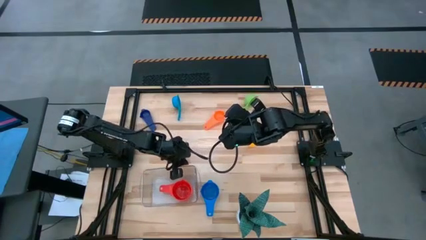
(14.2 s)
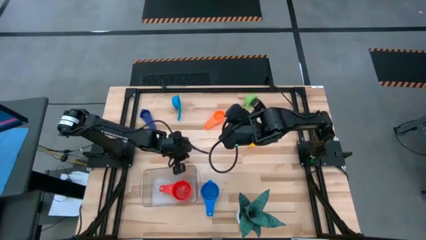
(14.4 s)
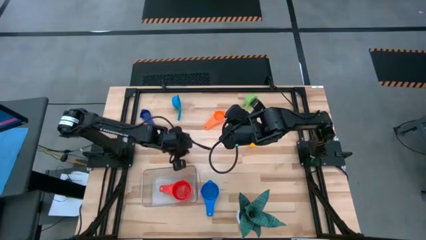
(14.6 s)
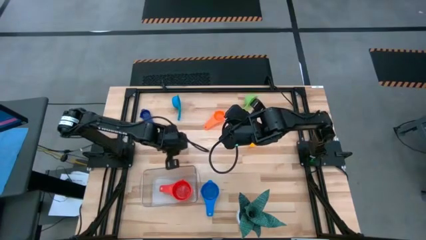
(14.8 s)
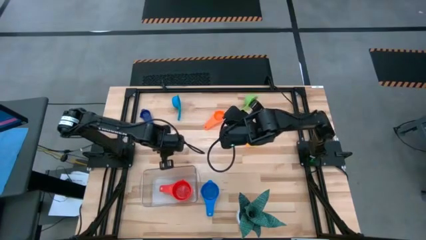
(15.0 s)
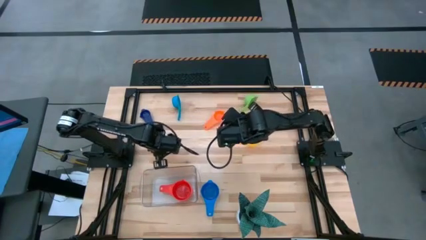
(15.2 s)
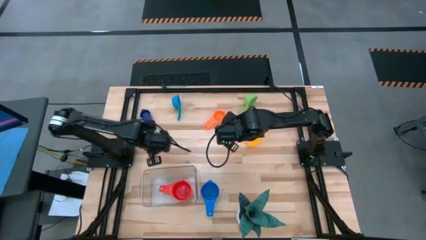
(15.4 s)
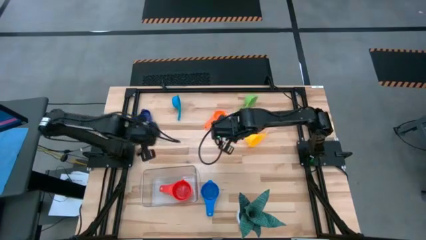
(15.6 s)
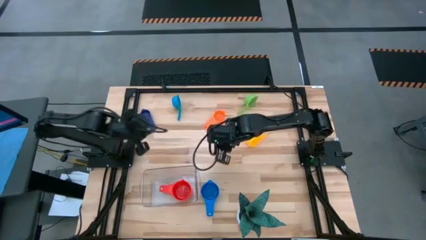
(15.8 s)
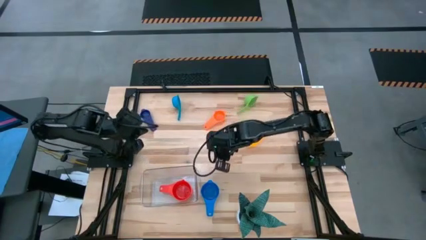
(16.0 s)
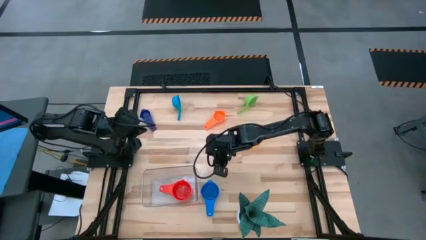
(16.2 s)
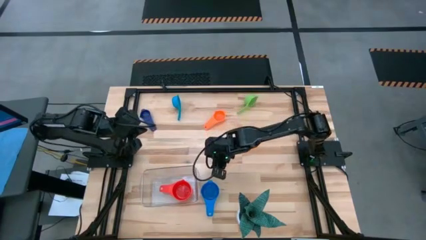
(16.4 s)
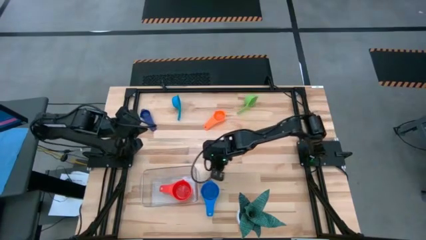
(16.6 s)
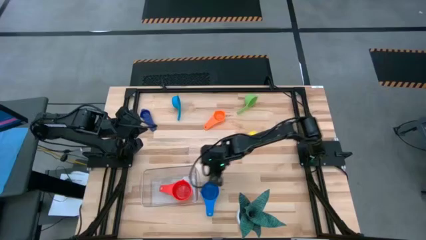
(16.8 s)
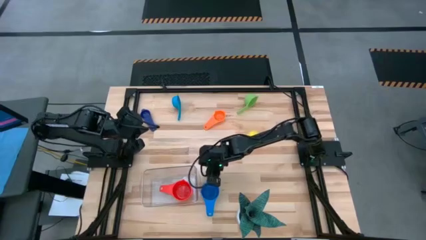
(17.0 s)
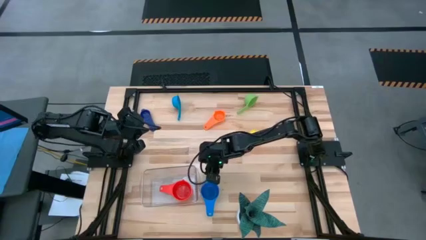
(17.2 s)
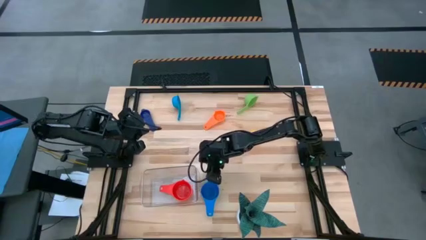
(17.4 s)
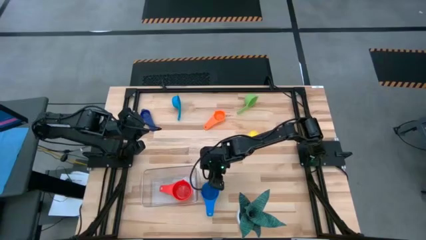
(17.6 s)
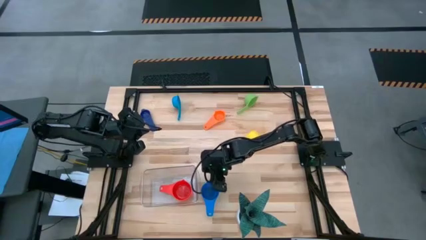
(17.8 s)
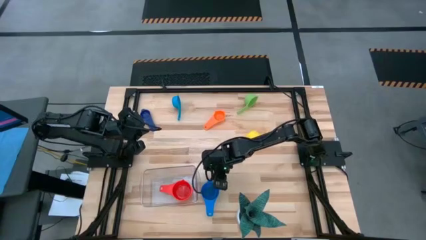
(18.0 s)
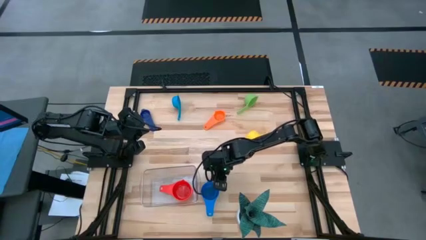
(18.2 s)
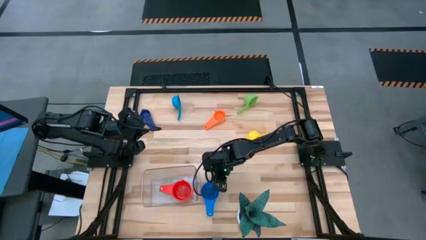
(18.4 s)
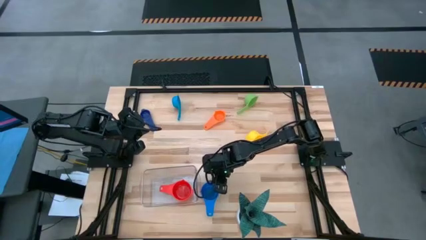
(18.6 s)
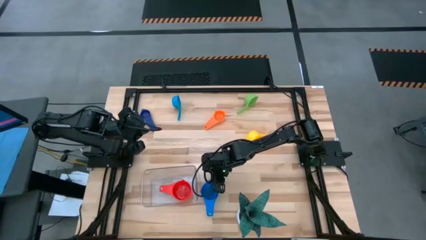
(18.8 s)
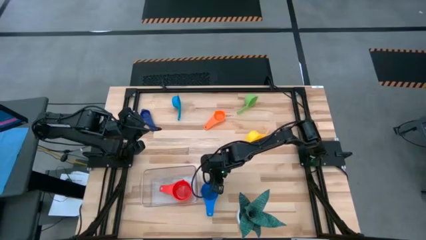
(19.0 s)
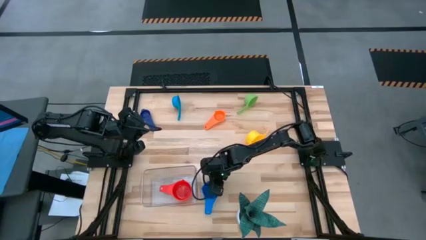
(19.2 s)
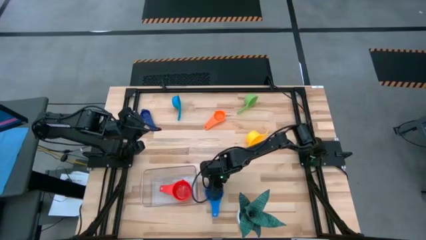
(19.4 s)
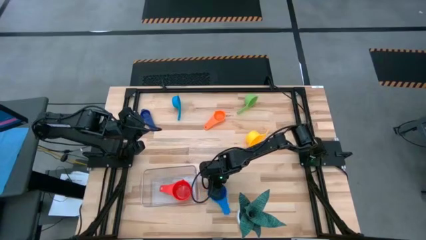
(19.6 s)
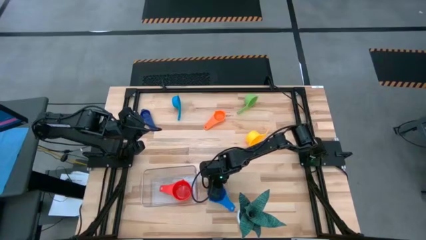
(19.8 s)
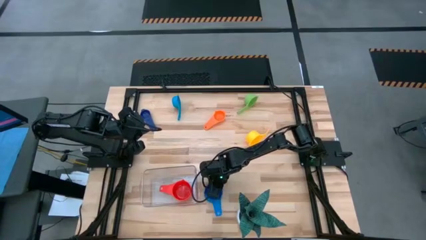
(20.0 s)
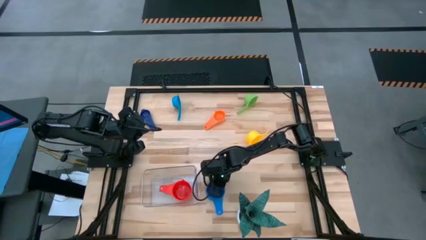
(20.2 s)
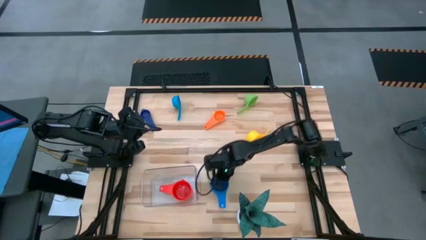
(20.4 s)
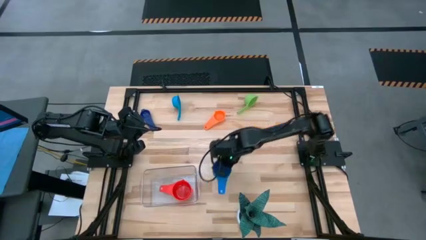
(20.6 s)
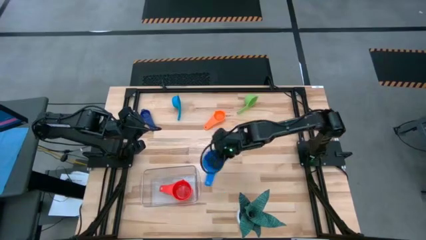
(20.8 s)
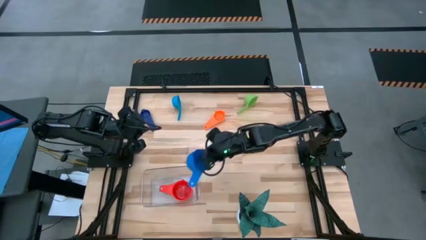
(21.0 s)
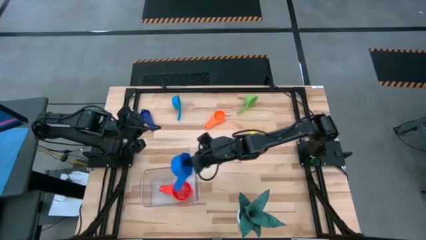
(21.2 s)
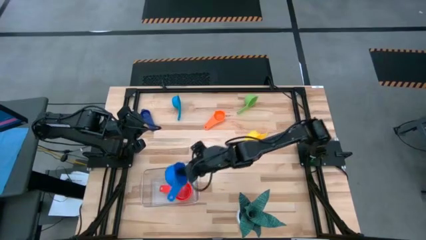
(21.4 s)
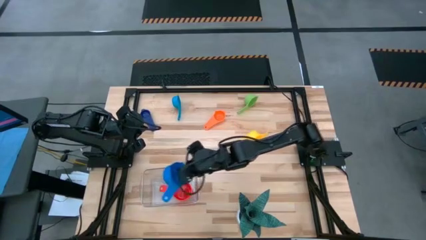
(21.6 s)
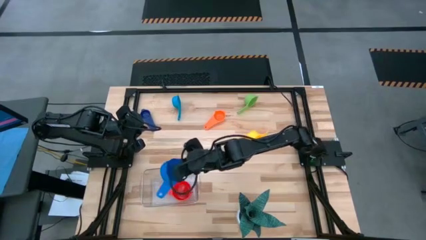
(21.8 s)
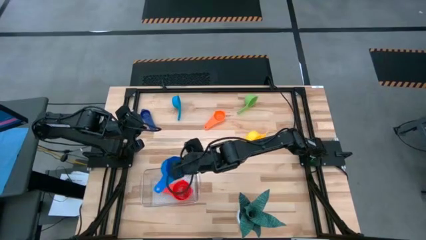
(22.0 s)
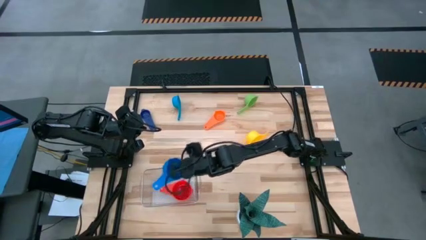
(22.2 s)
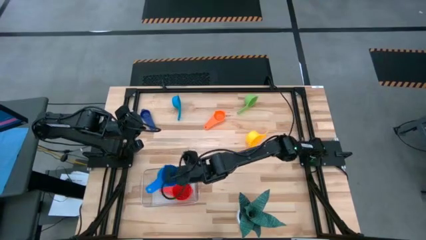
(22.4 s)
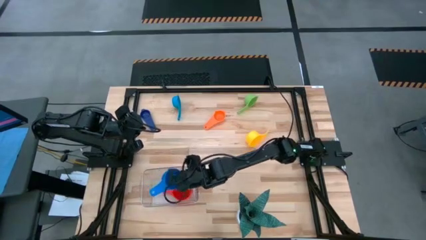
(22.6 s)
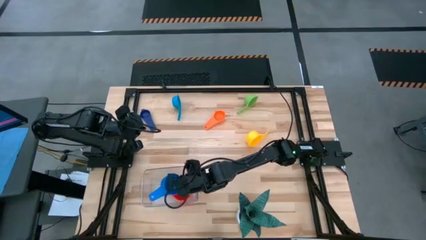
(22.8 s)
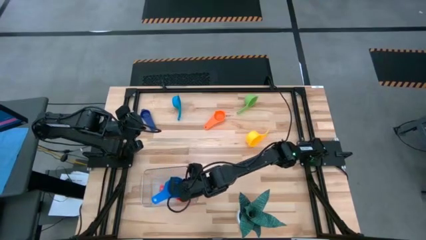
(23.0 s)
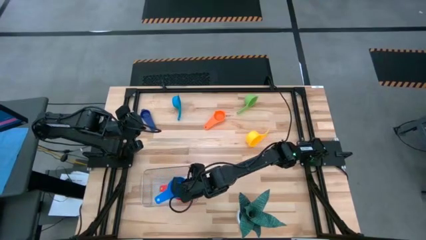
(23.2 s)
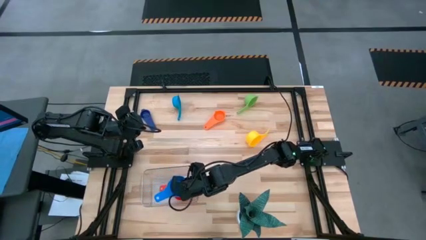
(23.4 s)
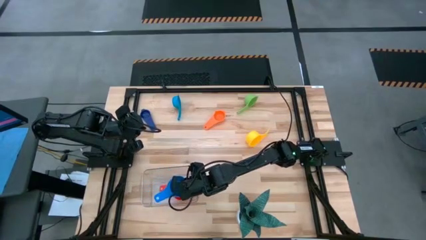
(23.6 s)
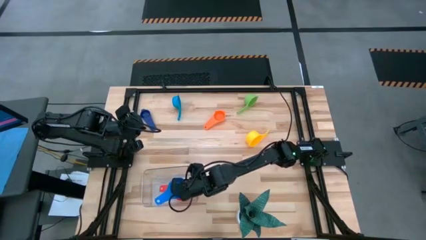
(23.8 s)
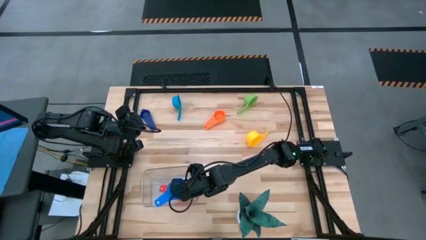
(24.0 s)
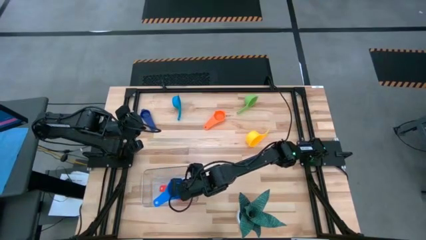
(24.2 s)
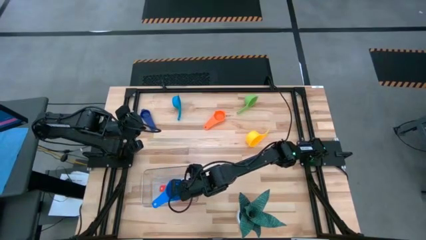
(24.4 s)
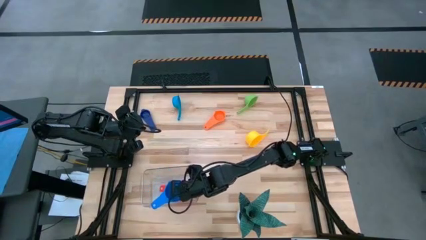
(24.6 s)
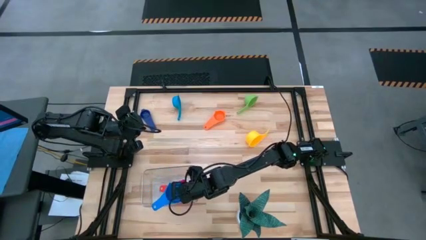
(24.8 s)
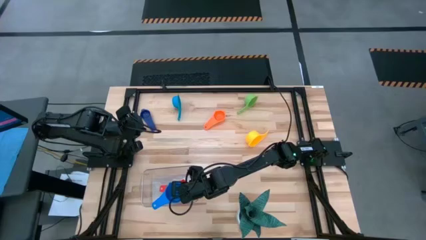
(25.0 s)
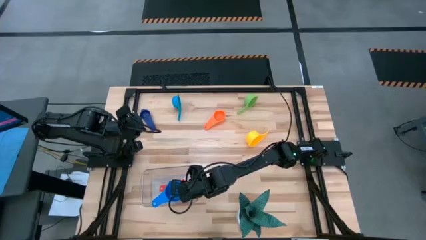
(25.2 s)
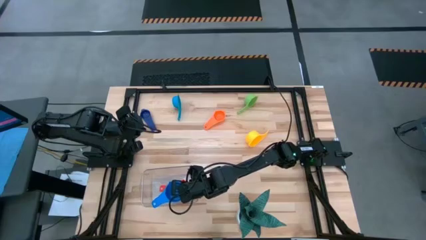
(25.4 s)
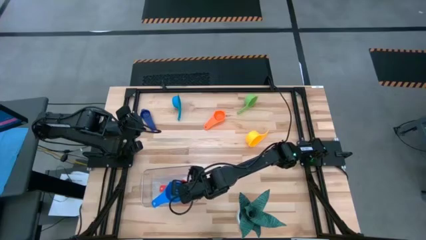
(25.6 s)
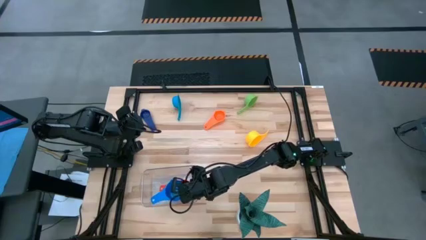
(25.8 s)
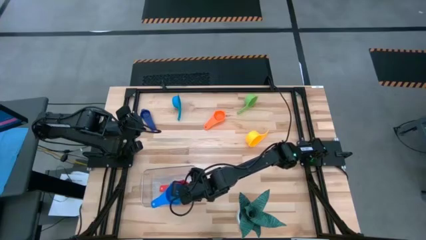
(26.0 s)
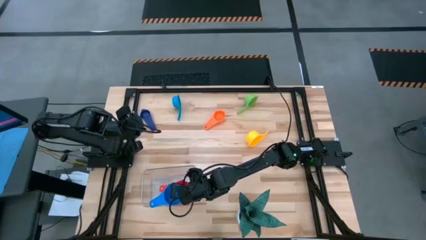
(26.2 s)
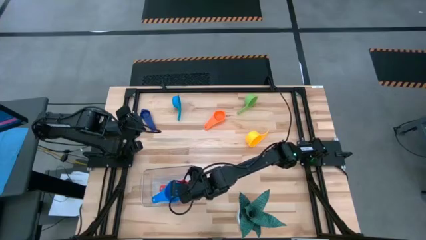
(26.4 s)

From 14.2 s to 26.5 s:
Task: Nest measuring cups in basket
Stack the blue measuring cup on top of the red measuring cup in the transparent bin

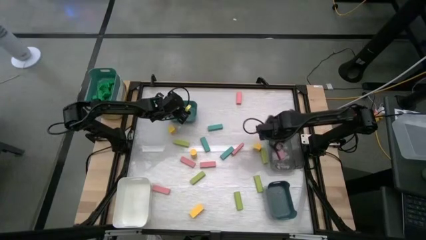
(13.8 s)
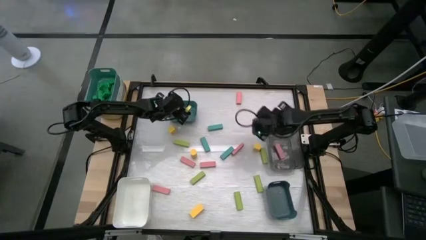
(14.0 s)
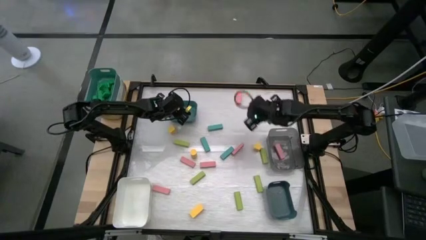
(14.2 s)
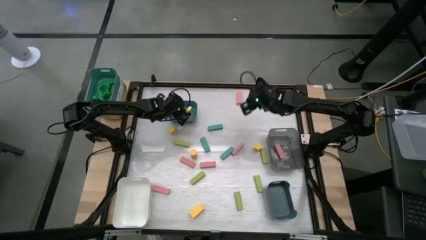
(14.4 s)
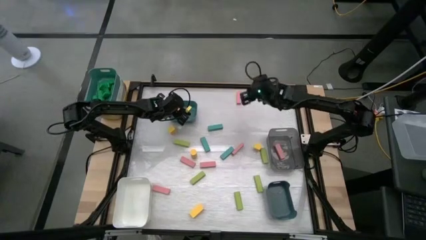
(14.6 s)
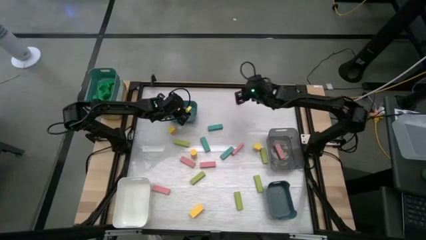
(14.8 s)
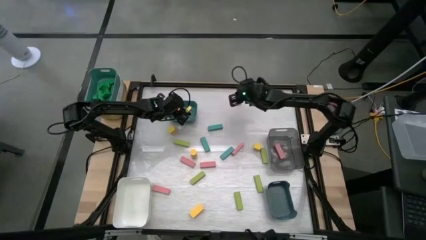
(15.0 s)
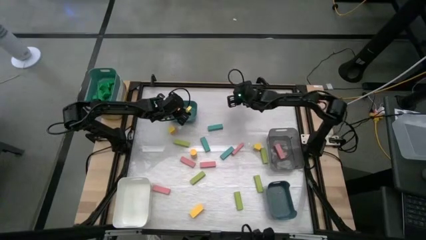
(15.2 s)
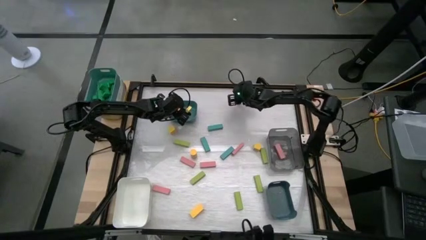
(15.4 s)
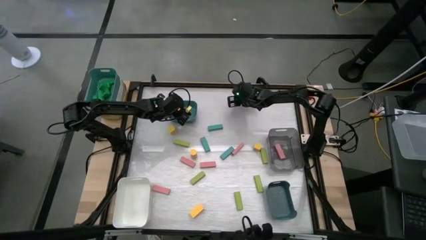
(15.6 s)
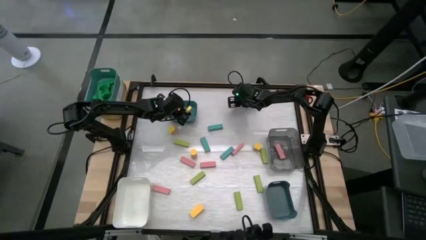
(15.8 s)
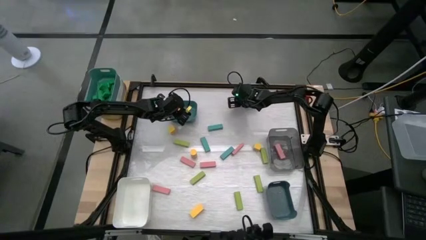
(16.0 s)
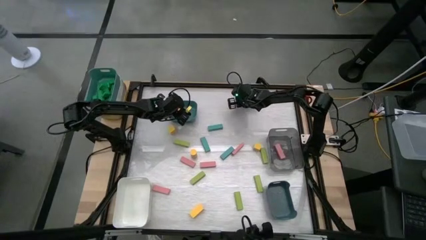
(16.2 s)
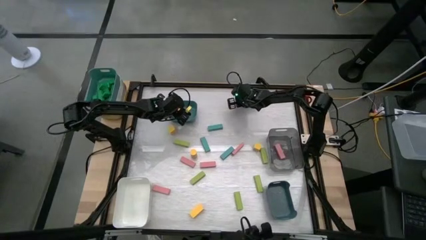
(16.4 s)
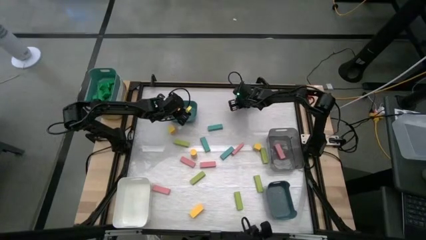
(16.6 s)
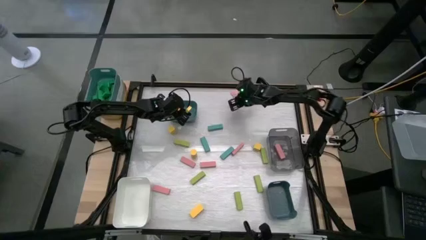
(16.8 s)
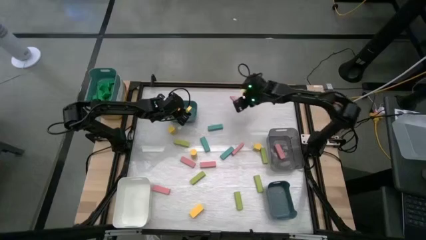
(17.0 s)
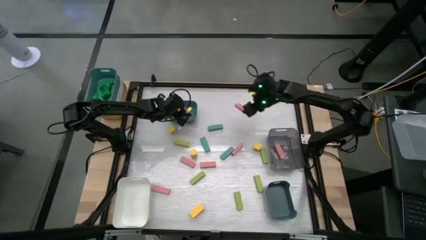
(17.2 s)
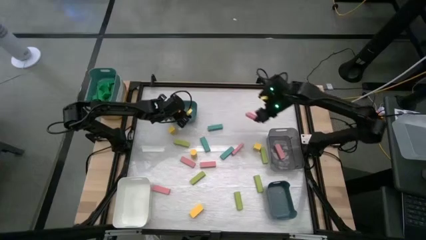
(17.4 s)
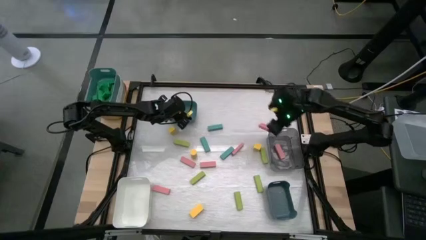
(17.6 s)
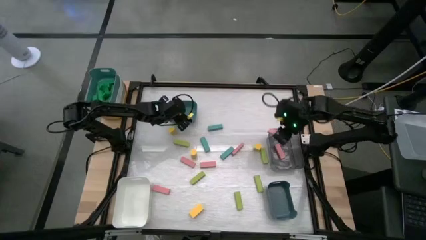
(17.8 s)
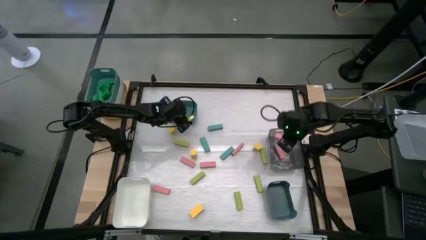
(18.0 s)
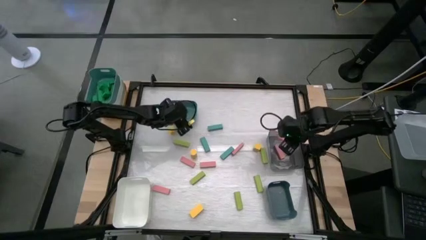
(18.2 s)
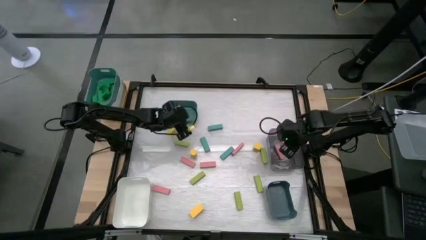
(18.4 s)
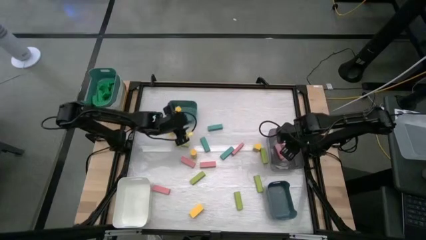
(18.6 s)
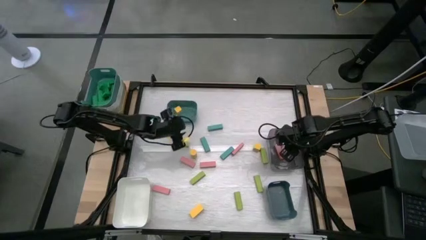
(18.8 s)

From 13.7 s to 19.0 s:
Task: Sort blocks
Put the pink block into the black bin
